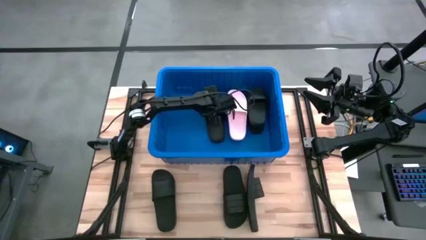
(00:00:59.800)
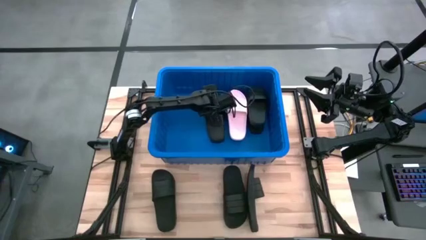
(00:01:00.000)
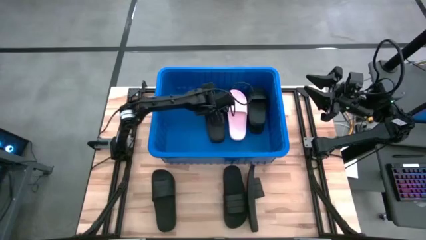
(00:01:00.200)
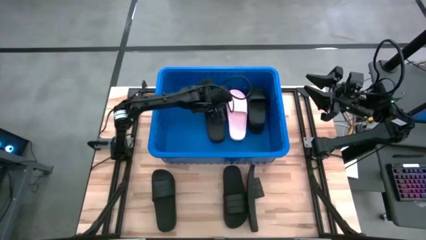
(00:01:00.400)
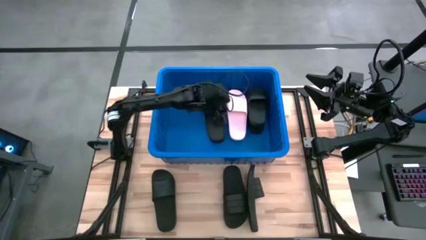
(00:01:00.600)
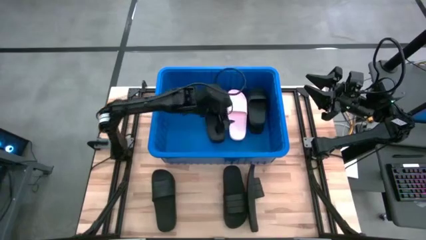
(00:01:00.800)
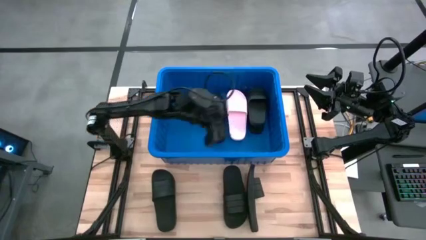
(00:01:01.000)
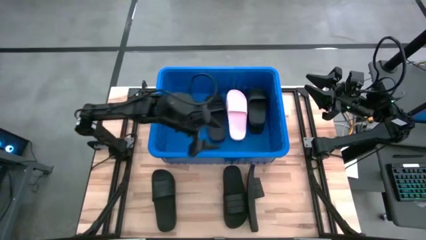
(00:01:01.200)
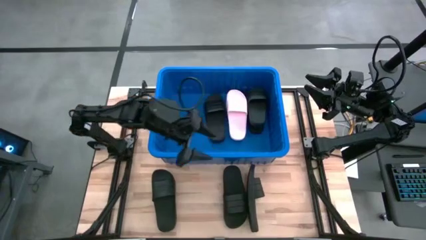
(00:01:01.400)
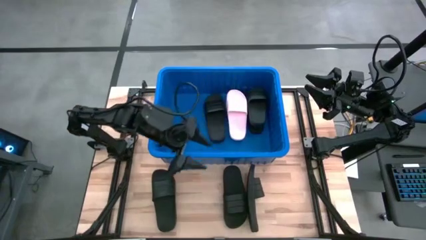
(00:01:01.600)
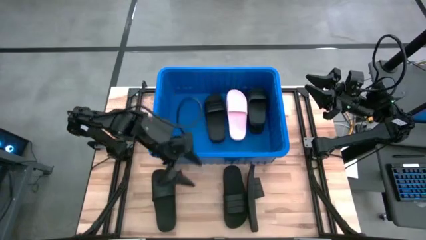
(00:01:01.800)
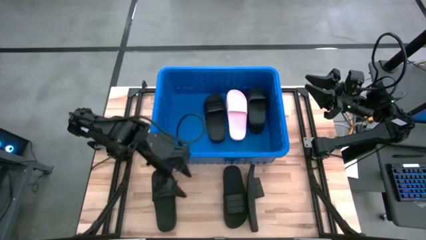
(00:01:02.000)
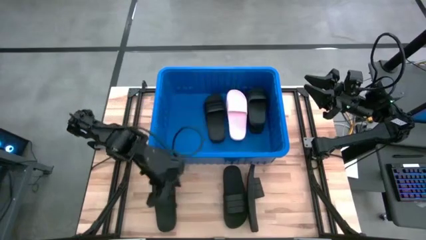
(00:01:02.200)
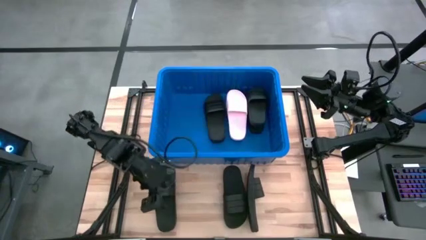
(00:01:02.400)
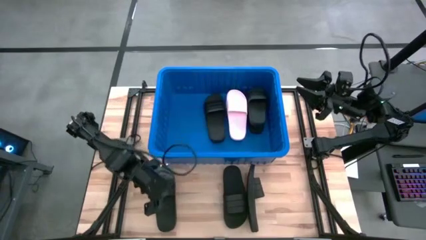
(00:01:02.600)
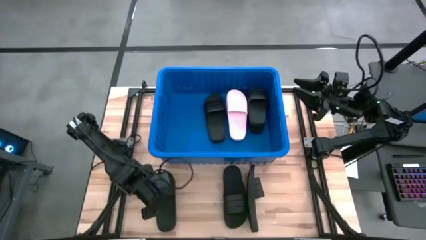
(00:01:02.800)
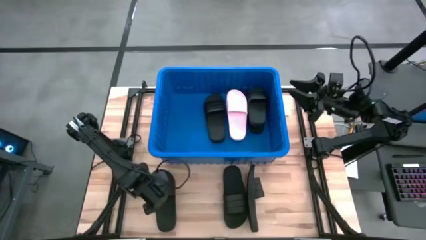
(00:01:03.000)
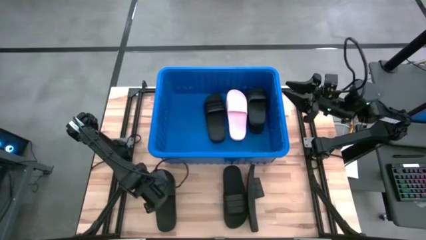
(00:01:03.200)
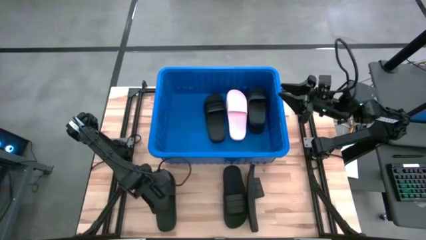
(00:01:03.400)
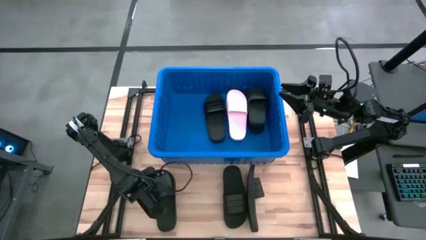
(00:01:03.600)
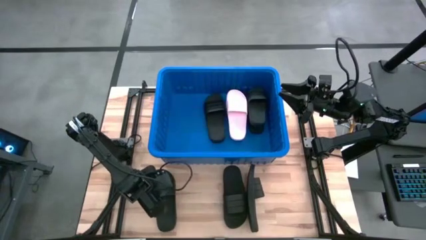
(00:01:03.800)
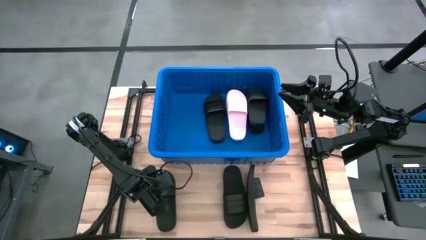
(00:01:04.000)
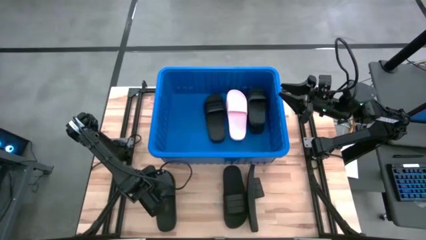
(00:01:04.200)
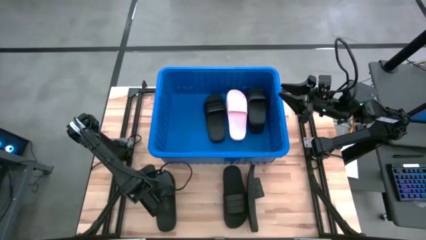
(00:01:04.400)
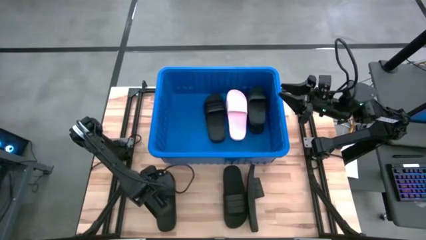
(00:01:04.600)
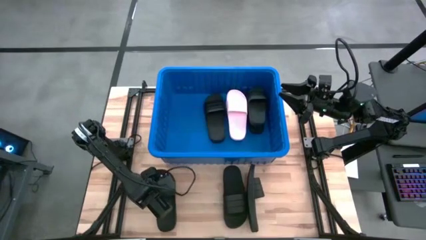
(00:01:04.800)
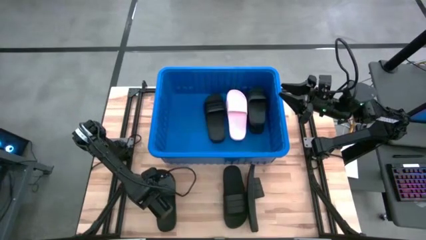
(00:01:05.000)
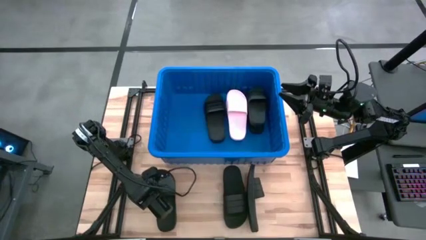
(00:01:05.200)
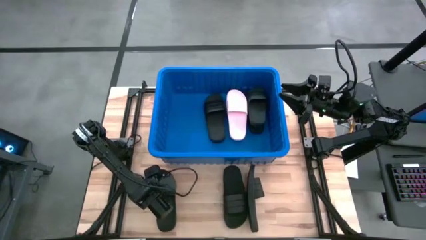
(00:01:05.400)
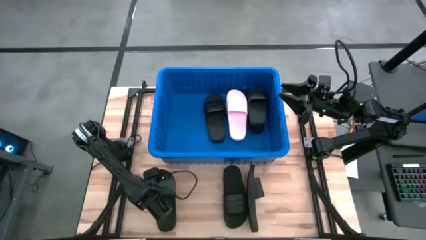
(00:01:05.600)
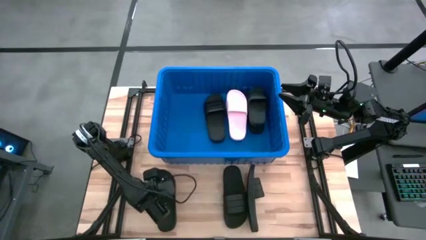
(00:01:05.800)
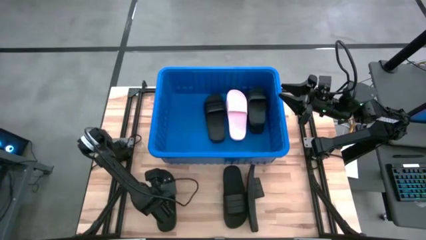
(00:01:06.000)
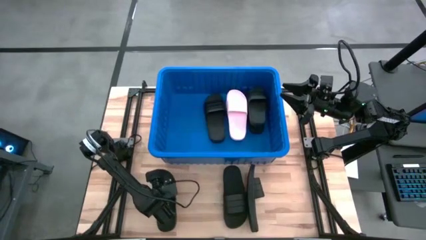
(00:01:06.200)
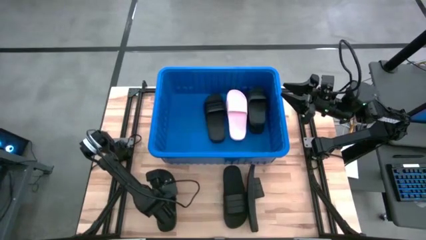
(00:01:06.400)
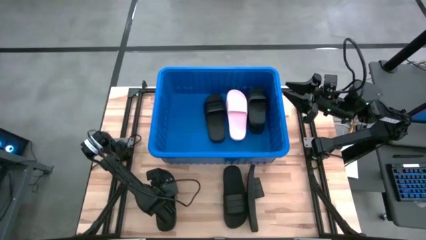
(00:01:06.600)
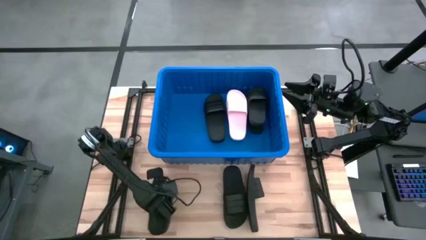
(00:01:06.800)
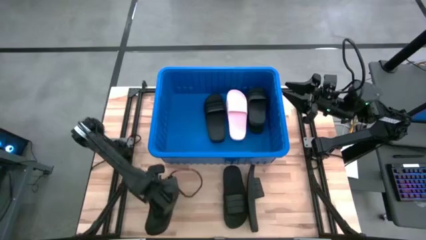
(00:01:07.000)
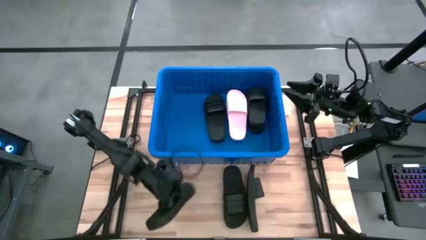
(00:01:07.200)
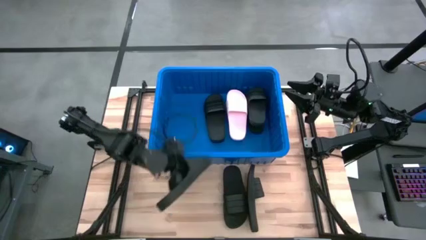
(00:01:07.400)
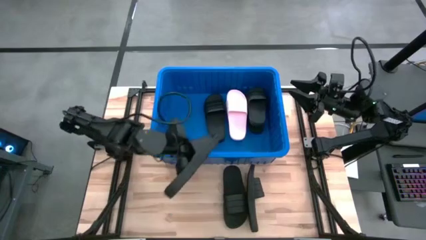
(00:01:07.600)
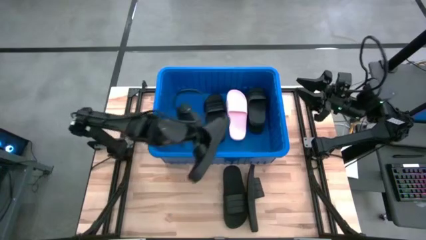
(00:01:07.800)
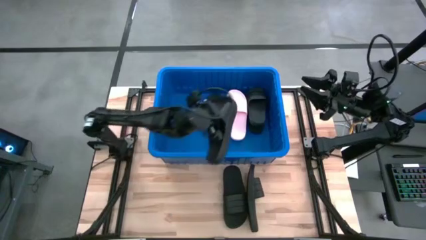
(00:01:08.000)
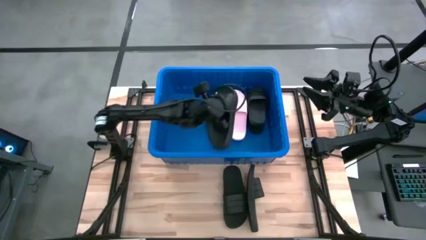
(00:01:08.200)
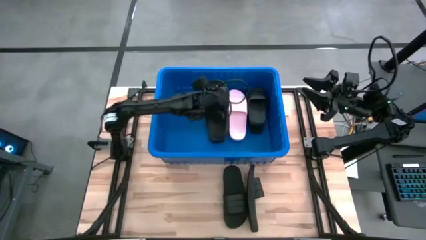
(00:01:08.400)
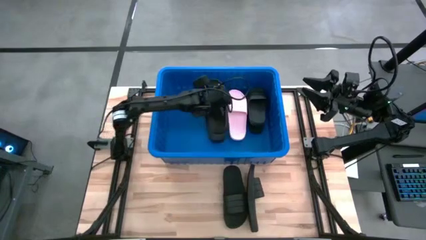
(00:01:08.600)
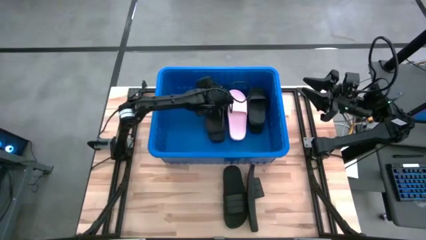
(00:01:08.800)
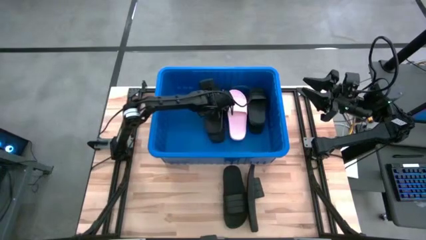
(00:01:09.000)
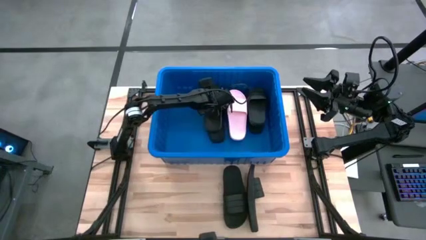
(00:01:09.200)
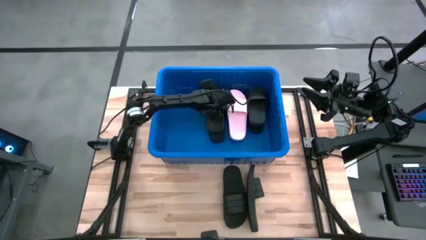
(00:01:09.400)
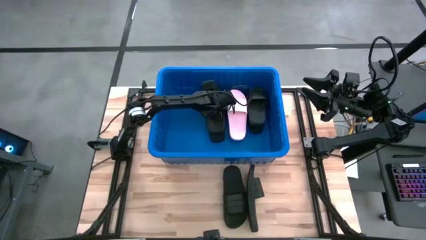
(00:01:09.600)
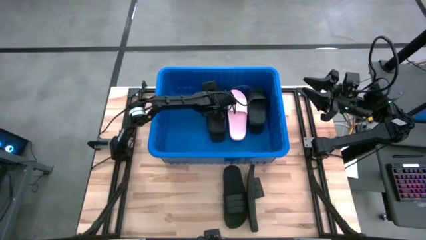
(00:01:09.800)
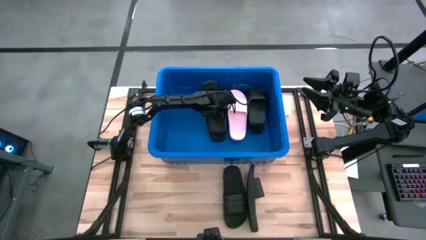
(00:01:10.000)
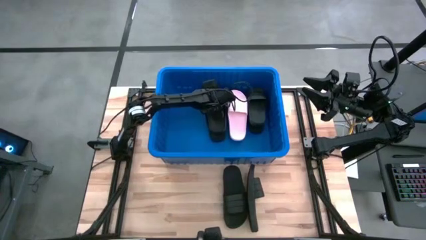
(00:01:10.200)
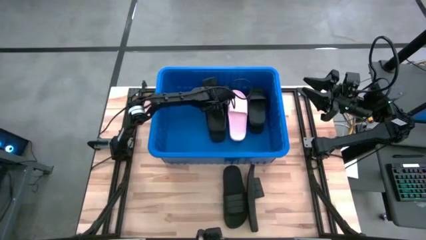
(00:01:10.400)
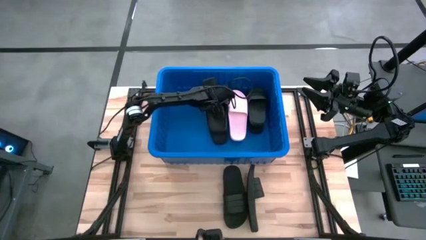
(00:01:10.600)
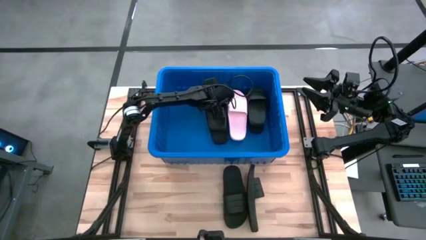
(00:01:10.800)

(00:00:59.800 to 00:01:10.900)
Task: Pick and place slides into bin
Put the black slide into the bin

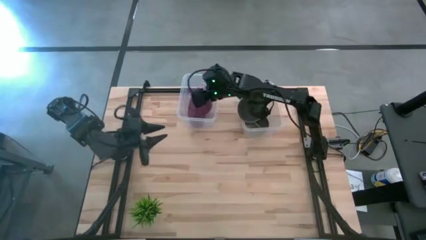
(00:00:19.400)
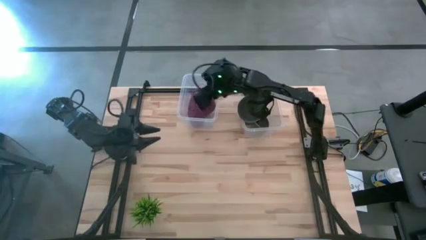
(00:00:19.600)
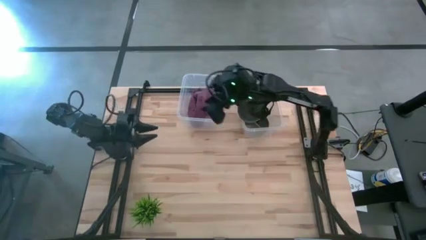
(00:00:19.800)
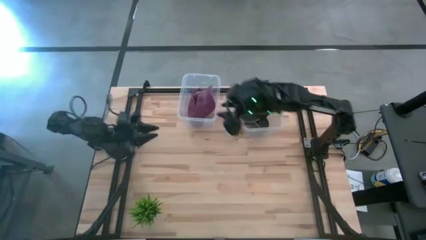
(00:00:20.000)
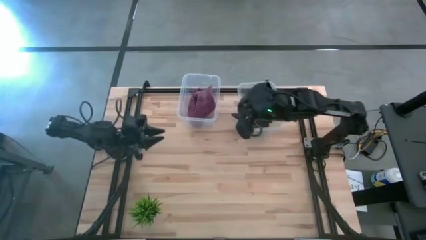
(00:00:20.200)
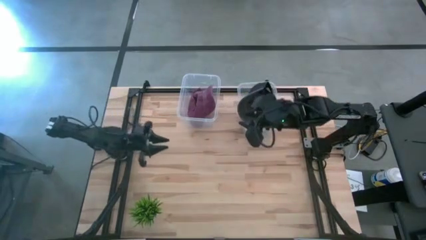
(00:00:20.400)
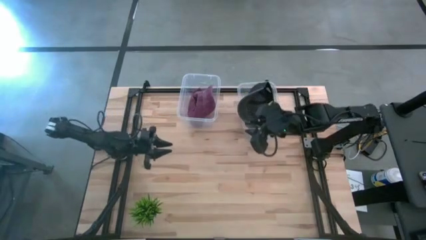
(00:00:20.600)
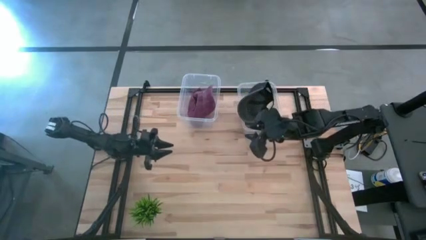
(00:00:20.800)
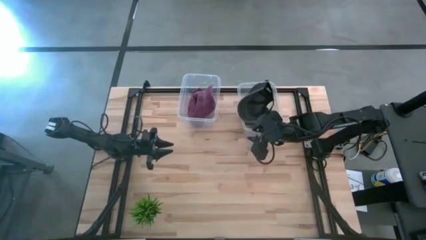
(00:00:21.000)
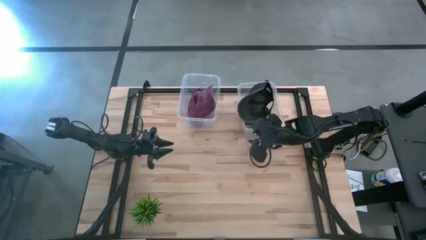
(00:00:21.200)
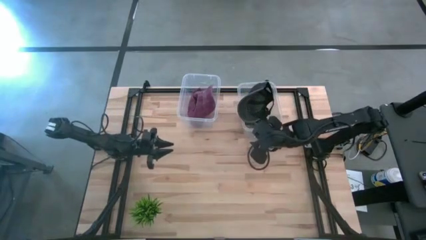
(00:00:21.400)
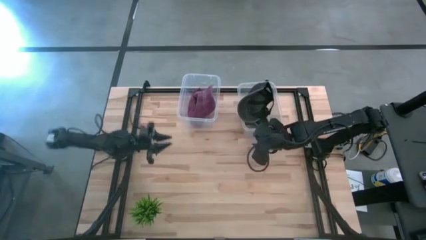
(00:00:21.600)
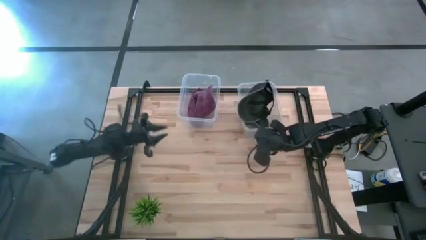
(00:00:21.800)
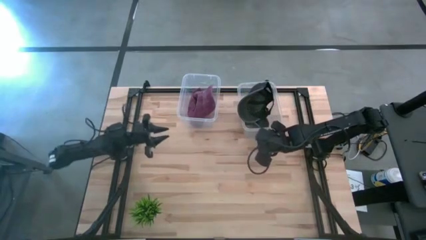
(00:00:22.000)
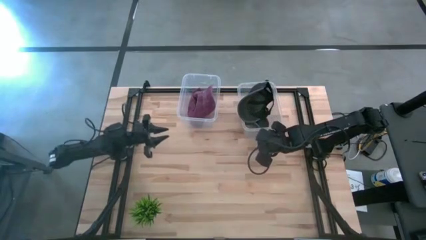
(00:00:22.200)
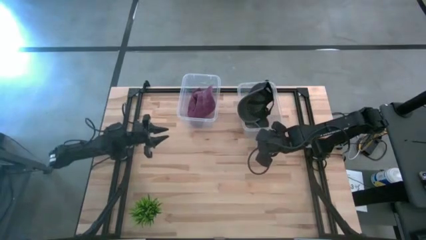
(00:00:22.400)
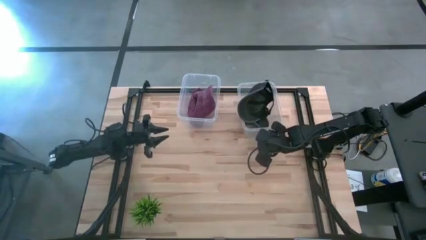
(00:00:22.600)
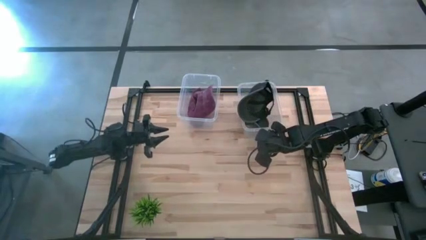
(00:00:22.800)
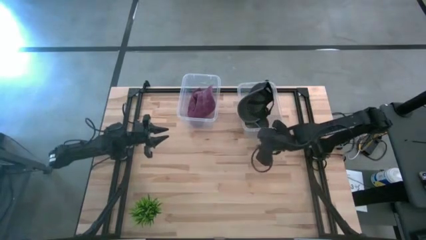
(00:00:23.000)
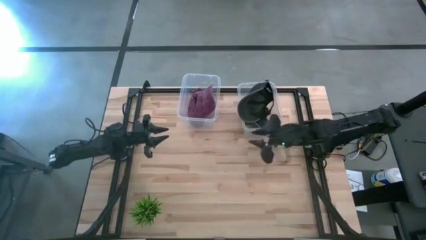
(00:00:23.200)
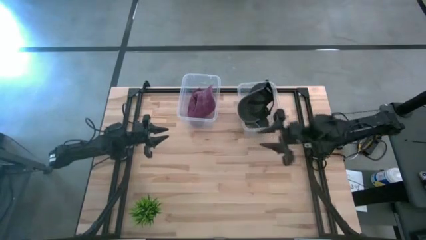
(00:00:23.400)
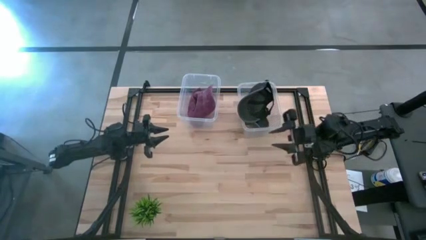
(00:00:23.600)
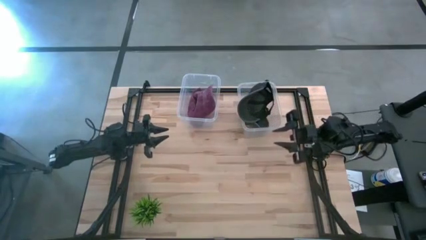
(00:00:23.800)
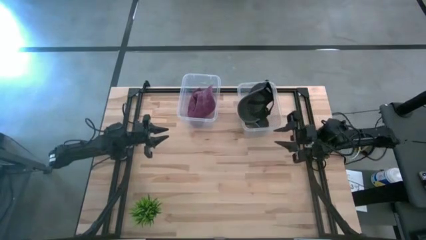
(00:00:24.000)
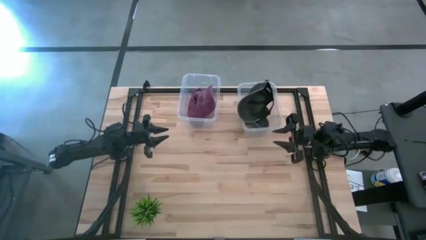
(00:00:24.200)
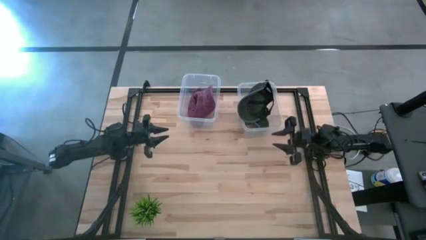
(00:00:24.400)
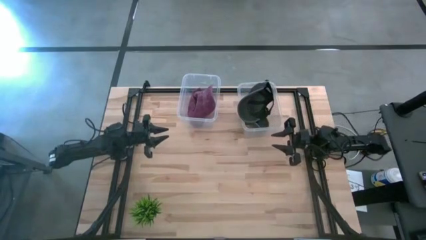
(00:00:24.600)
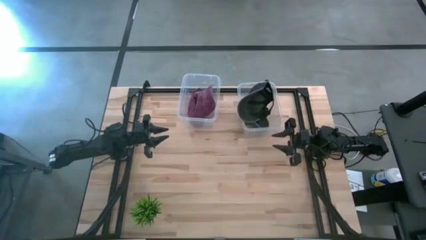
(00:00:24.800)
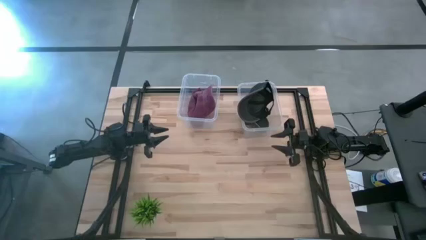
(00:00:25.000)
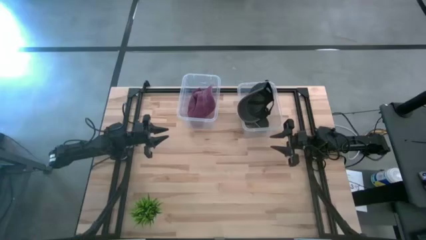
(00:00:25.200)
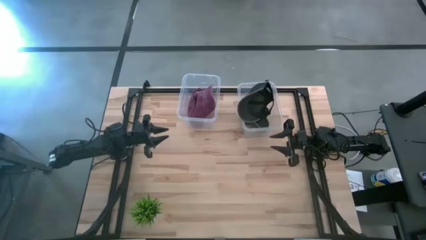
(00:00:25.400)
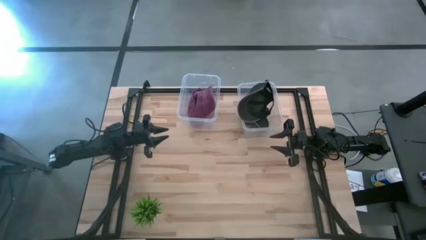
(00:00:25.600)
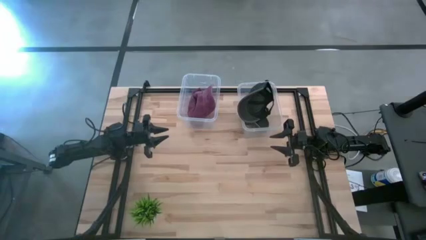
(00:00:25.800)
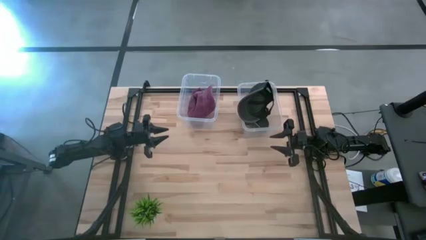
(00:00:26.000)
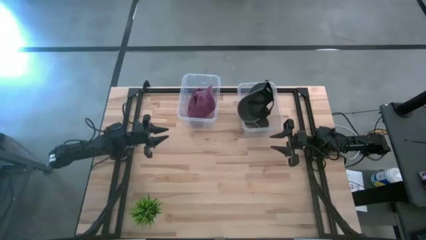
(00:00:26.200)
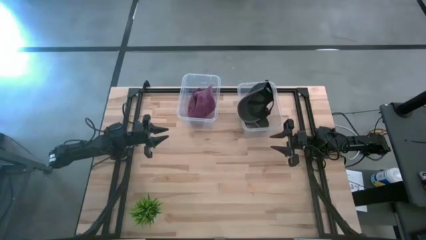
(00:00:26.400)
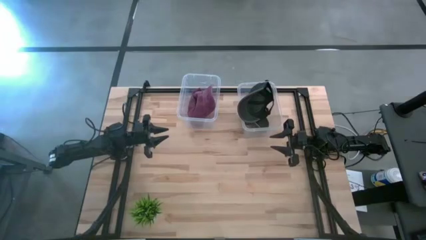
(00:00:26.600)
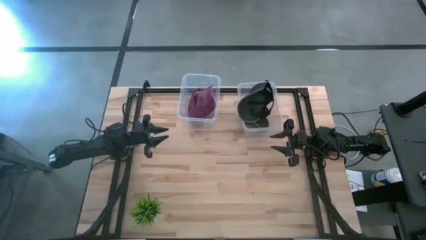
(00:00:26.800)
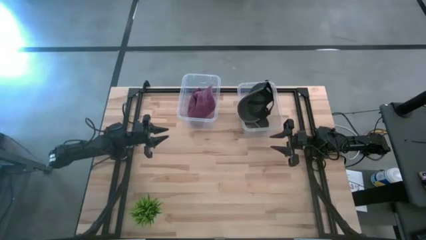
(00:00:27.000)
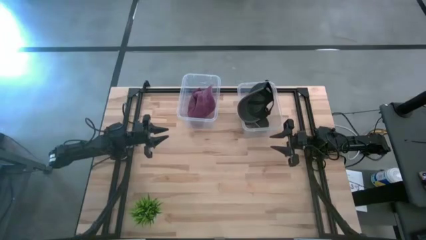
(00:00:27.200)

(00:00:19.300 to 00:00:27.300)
Task: Pick & Place hat
Return to Home Position
